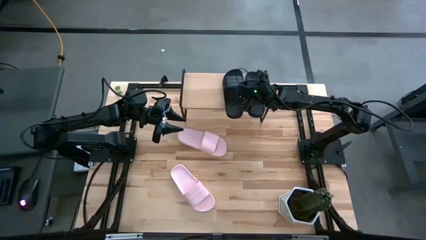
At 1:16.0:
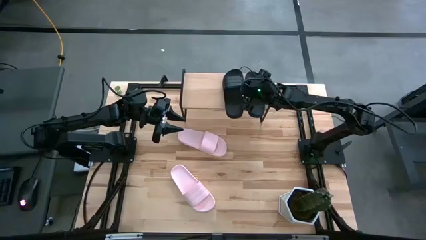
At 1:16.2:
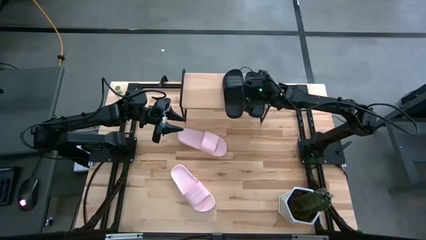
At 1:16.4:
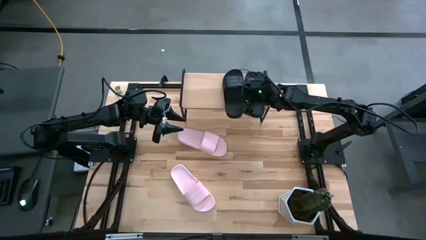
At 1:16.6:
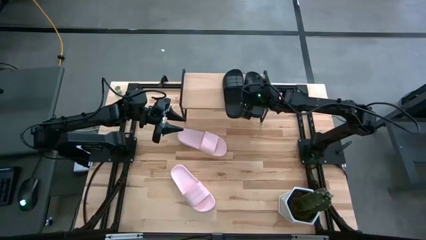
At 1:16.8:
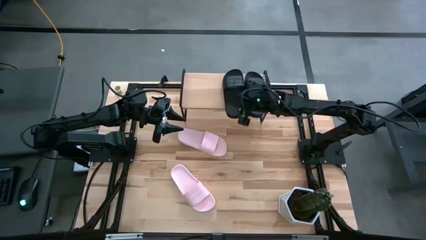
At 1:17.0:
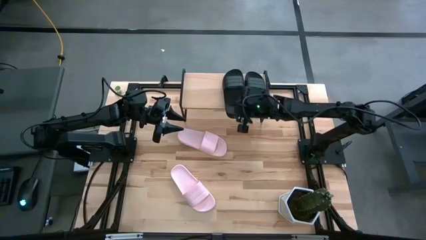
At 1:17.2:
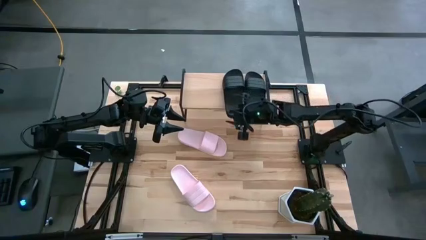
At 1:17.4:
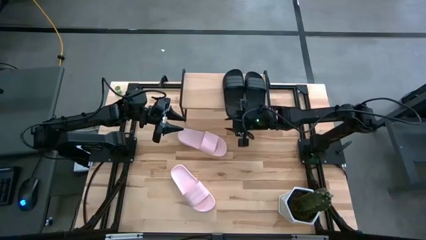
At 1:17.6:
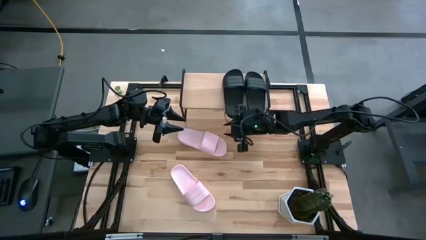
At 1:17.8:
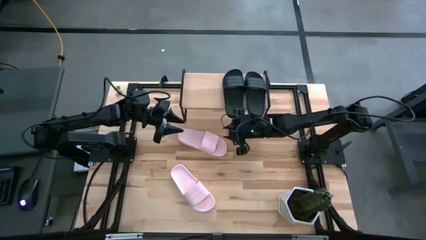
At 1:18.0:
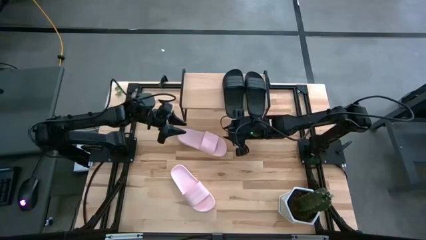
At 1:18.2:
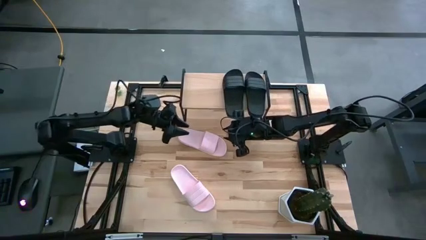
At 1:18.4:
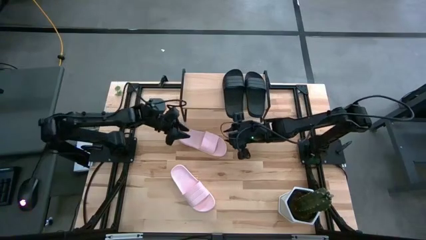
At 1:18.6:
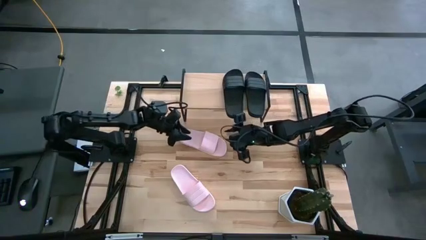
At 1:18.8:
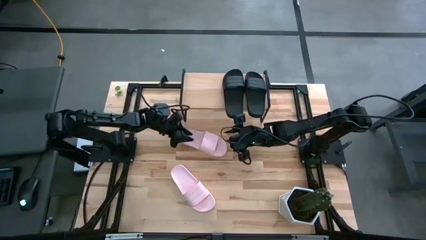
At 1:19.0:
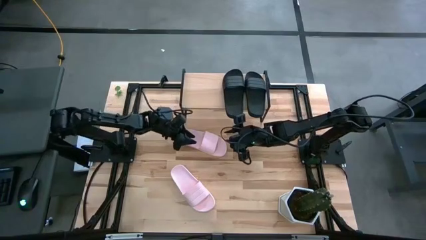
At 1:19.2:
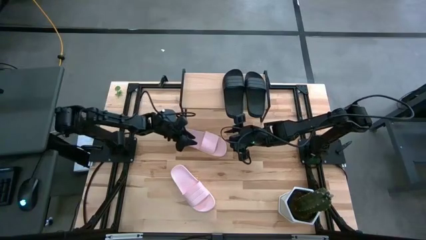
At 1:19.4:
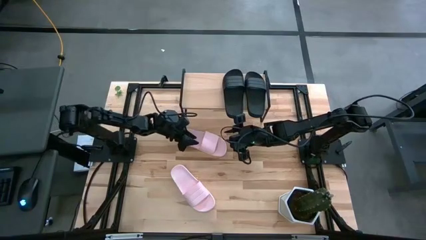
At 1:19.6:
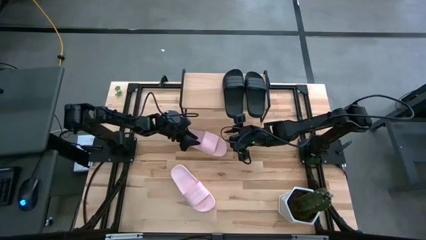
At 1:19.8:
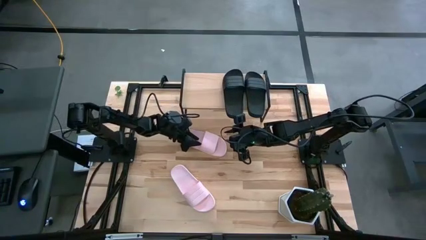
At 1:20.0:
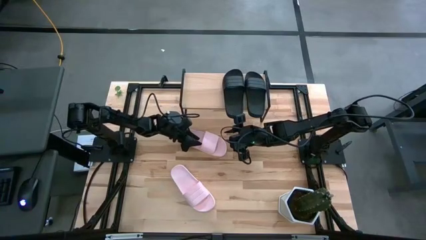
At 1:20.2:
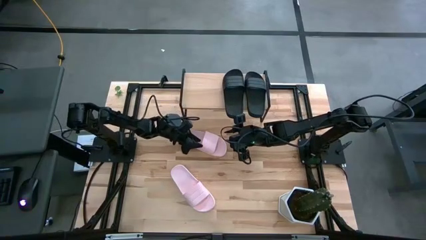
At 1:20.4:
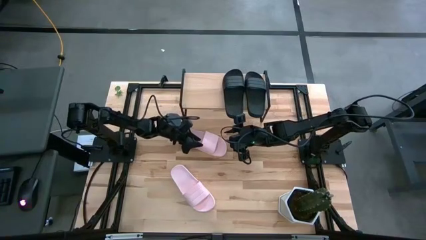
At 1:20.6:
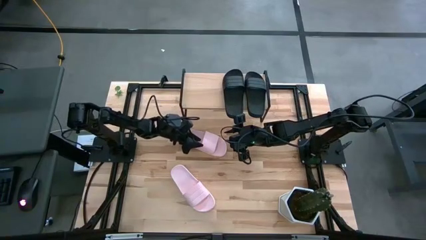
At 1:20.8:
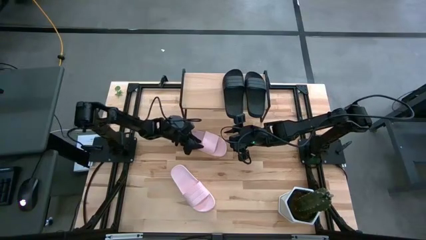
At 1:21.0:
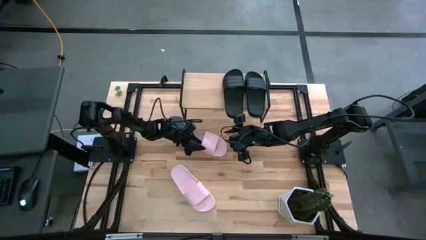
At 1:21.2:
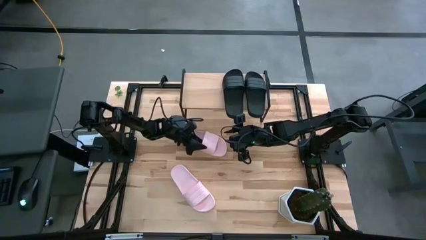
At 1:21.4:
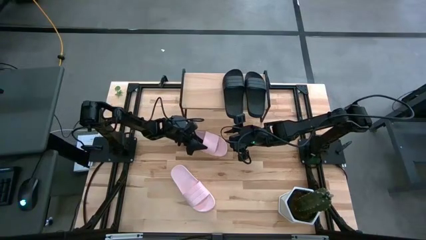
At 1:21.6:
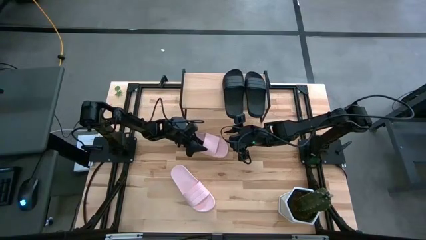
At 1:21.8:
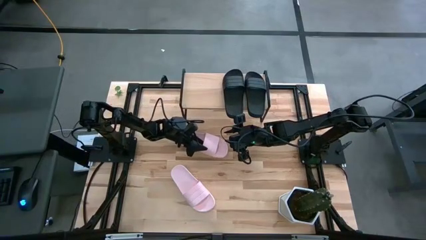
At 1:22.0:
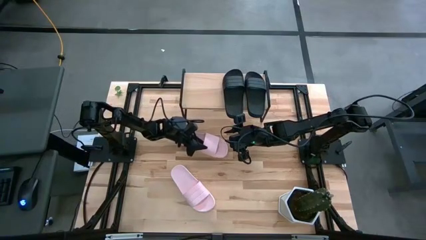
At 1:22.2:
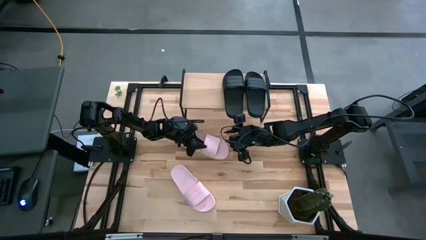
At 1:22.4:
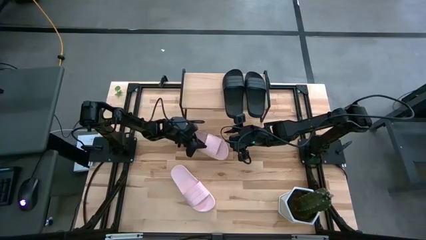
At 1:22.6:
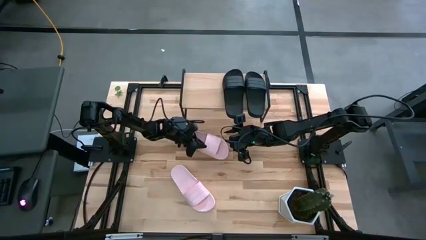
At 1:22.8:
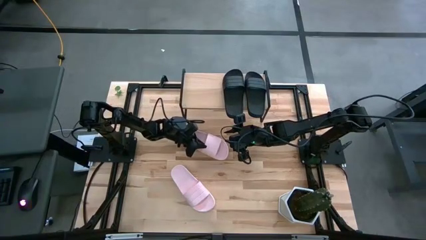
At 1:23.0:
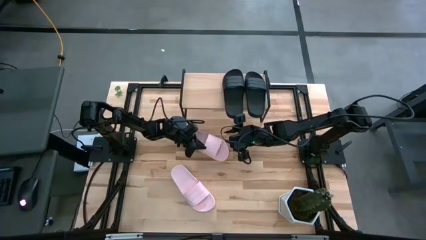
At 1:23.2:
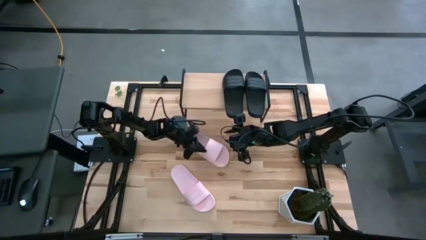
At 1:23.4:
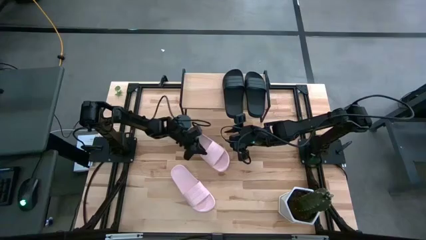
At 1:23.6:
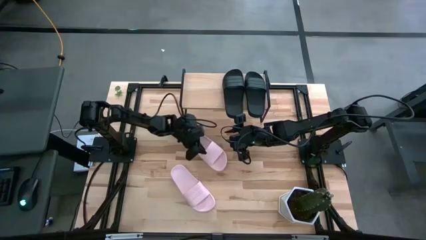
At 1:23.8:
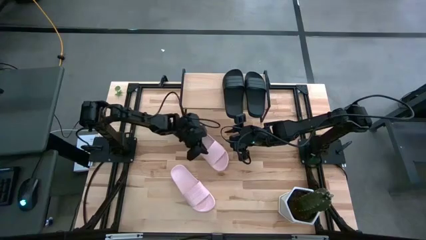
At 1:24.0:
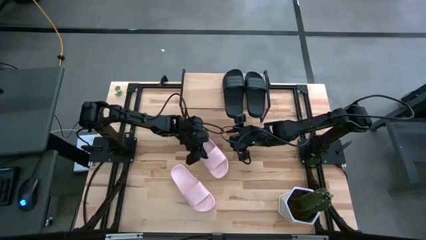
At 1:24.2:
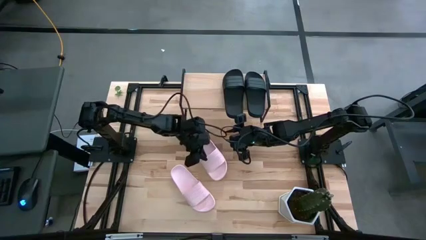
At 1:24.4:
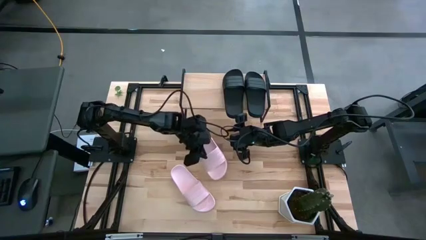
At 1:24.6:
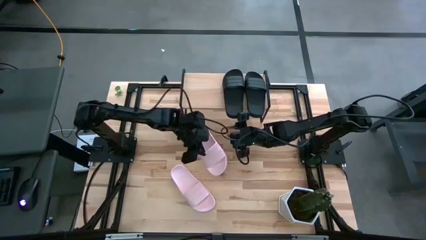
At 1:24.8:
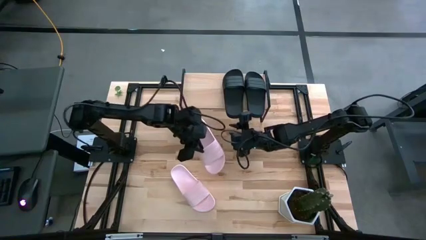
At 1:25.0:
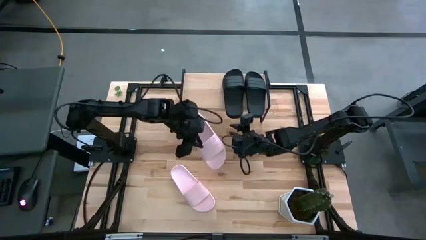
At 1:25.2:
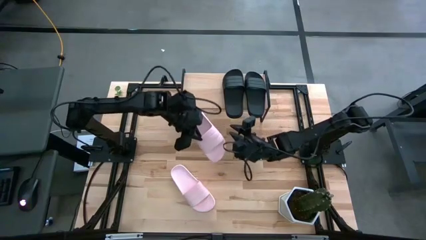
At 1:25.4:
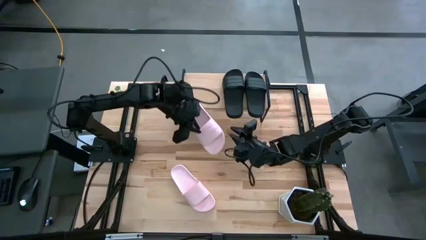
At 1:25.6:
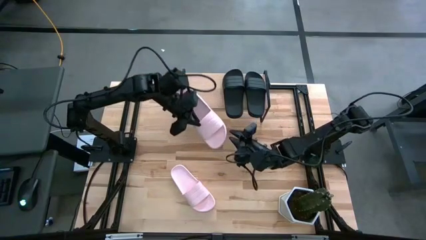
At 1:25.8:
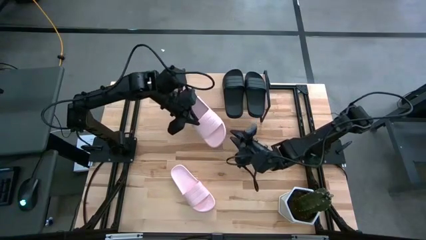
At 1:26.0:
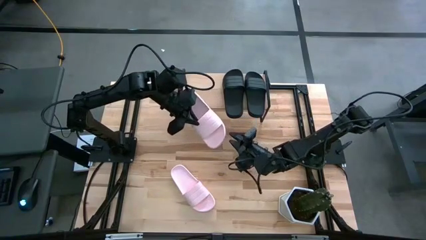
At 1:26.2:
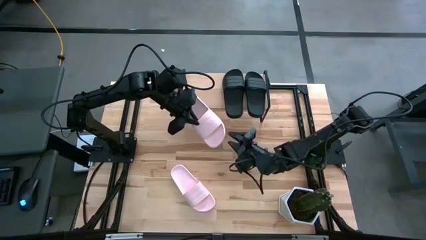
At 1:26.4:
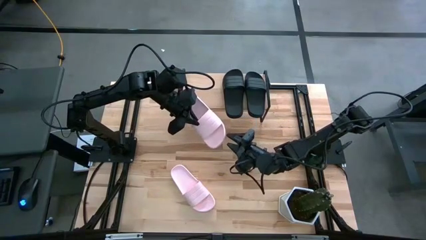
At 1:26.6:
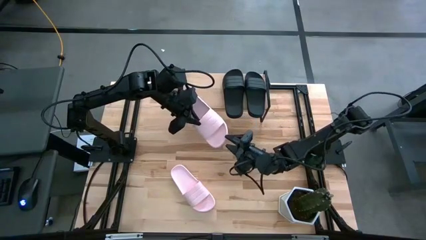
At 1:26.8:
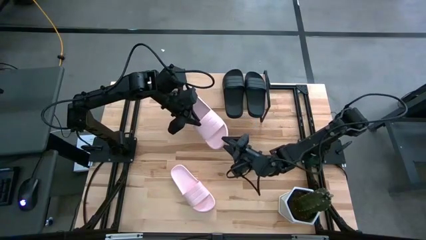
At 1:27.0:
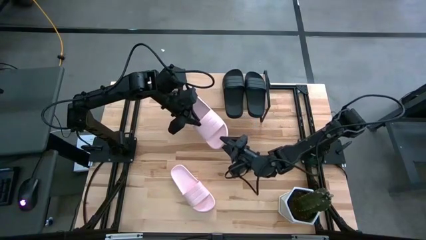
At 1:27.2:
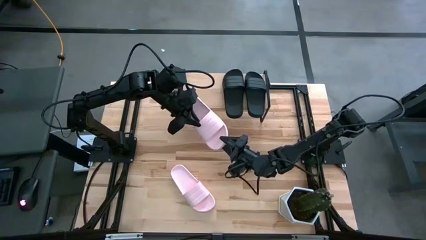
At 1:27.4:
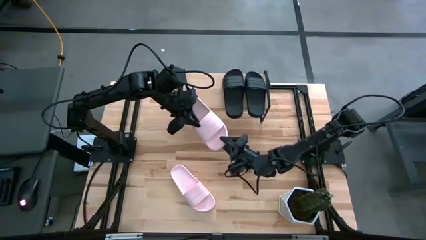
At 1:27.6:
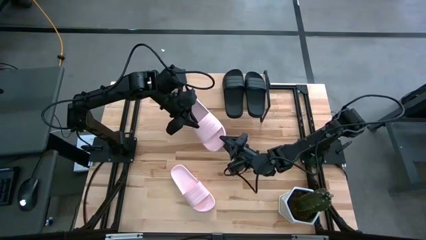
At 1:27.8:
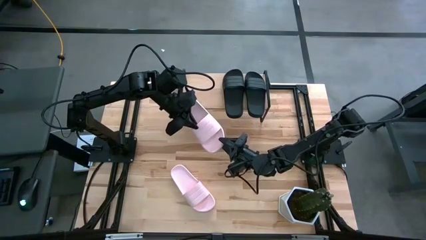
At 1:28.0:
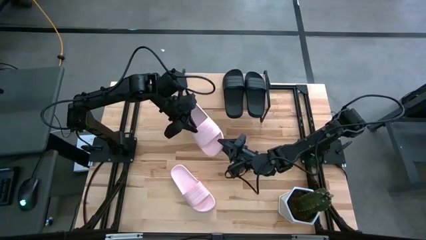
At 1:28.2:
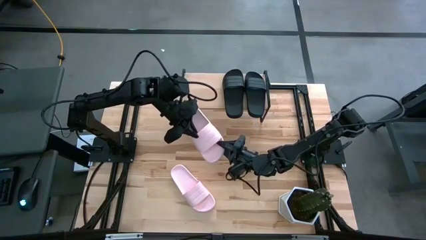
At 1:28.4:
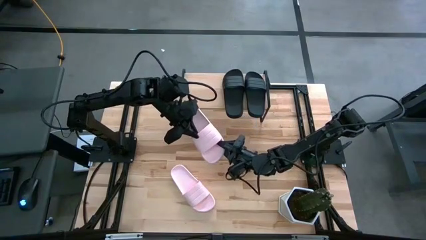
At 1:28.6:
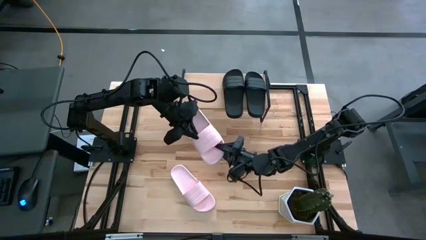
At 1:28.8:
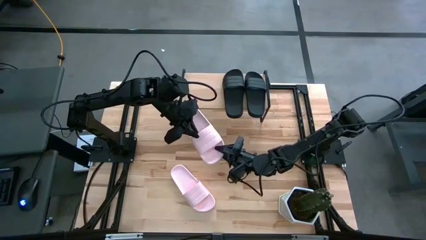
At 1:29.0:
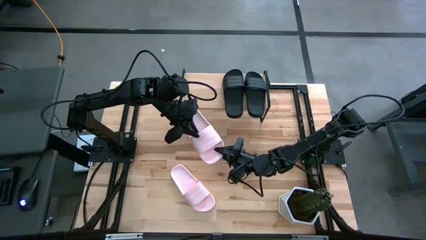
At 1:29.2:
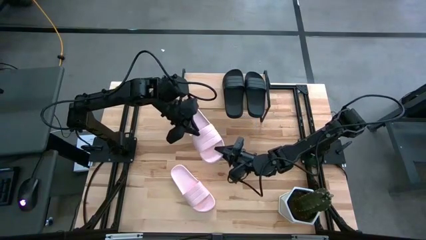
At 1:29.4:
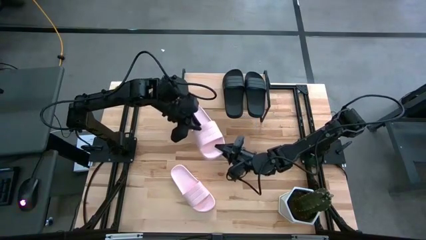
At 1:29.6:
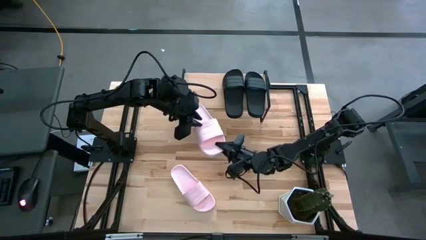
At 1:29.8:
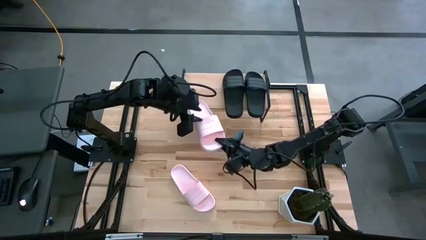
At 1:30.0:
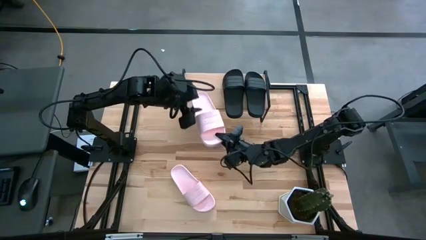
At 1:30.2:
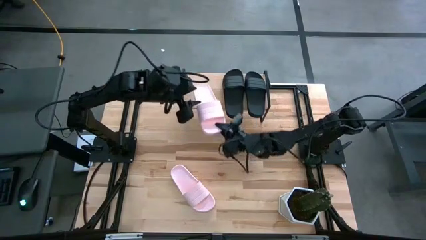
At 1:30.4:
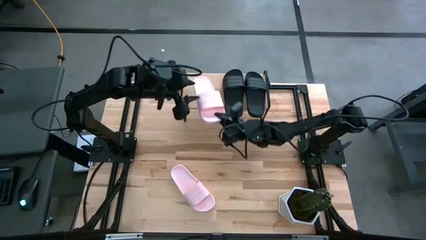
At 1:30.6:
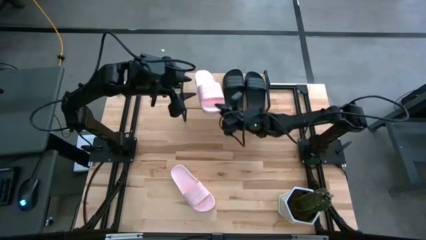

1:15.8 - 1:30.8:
Task: Pick and place slides into the shelf
Put the top pink slipper on the shelf
